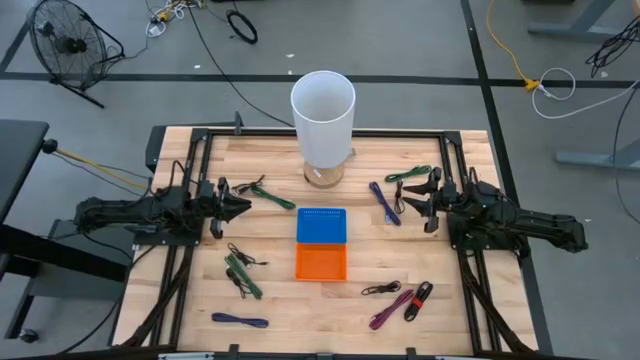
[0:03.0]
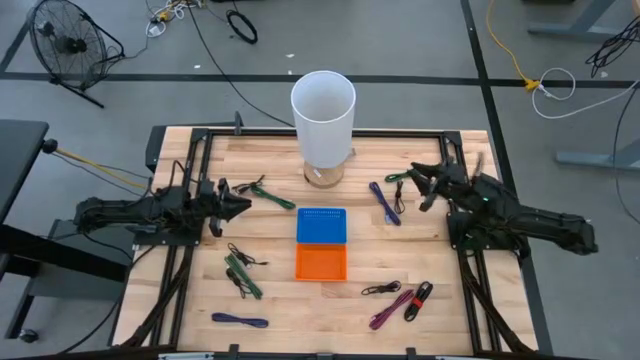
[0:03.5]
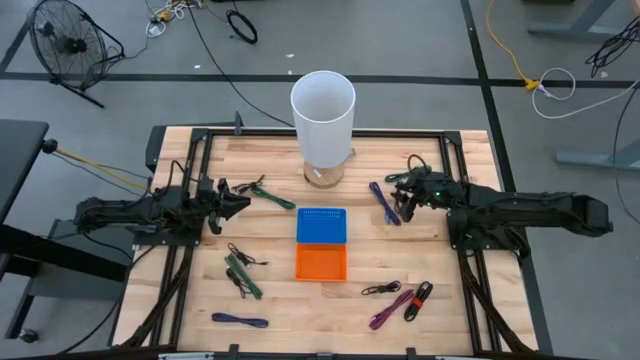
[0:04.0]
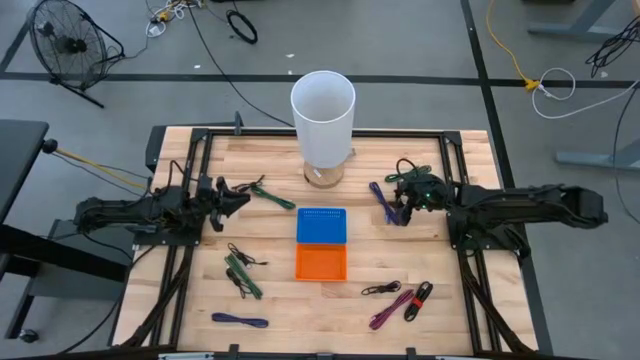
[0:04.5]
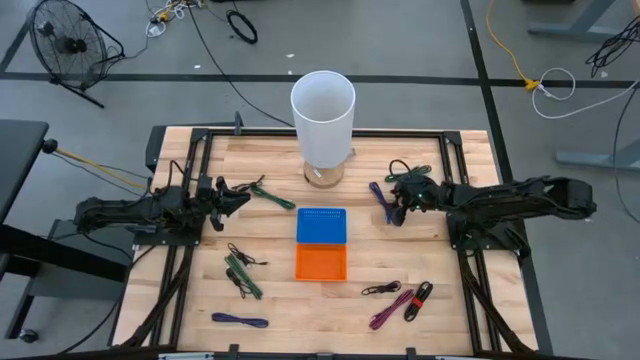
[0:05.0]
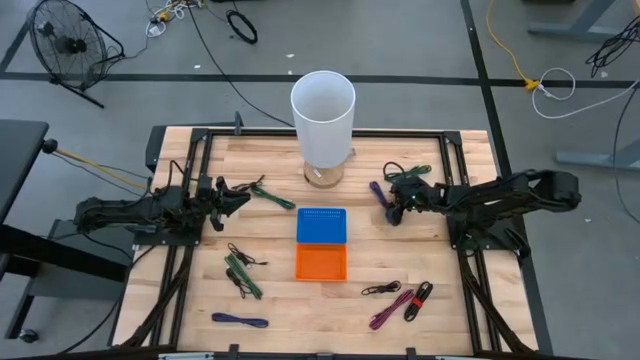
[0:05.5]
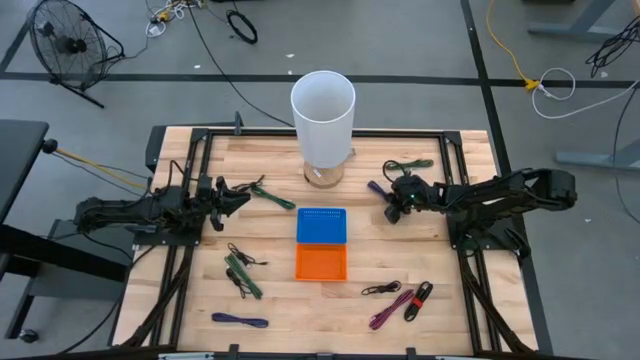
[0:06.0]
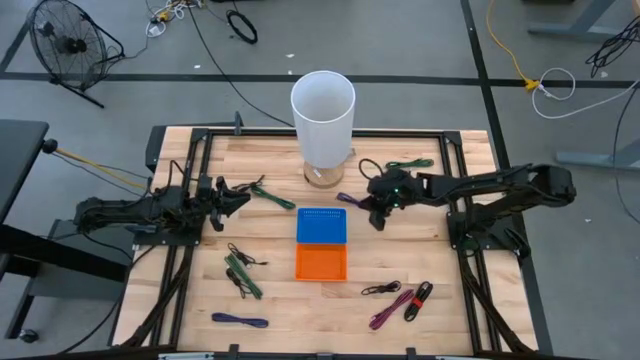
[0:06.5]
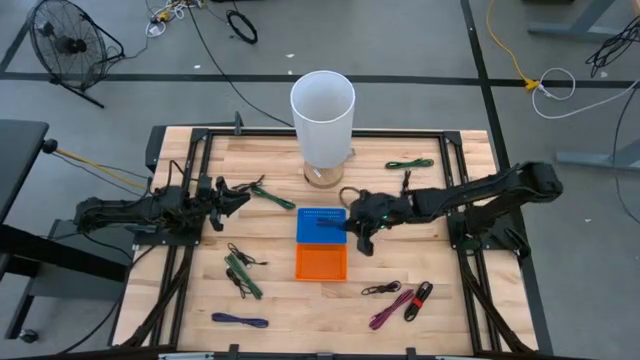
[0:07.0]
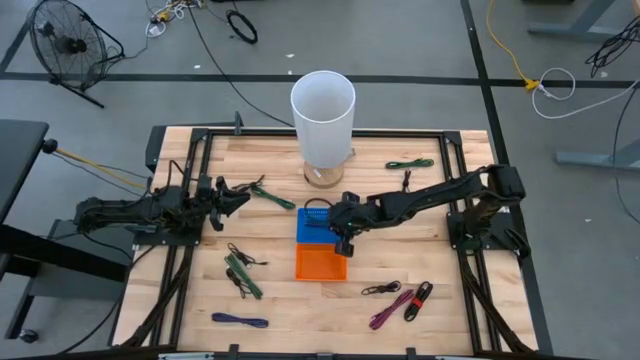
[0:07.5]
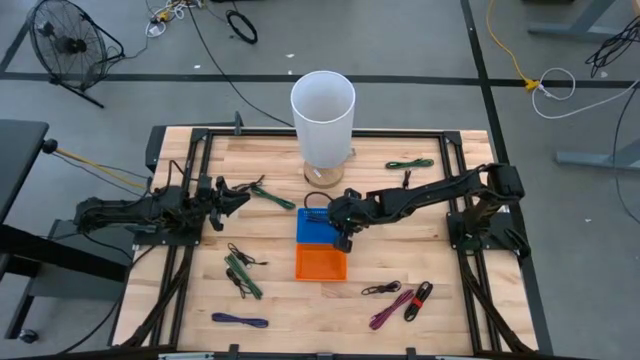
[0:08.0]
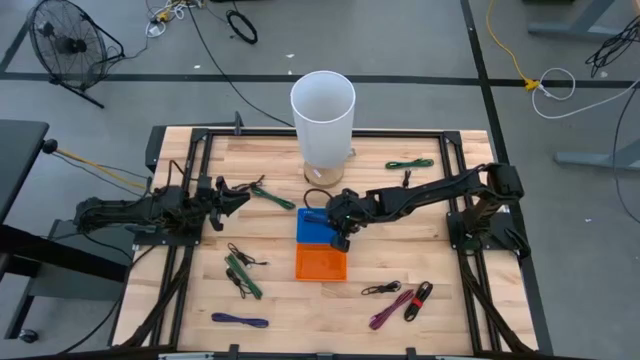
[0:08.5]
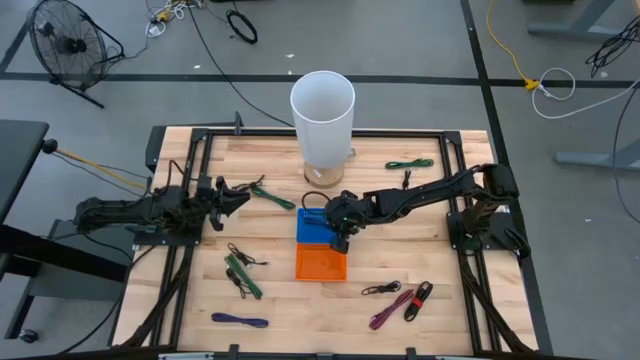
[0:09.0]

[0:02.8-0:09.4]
Task: Pick & Place USB Port
Put the blue charger cable into the blue bin

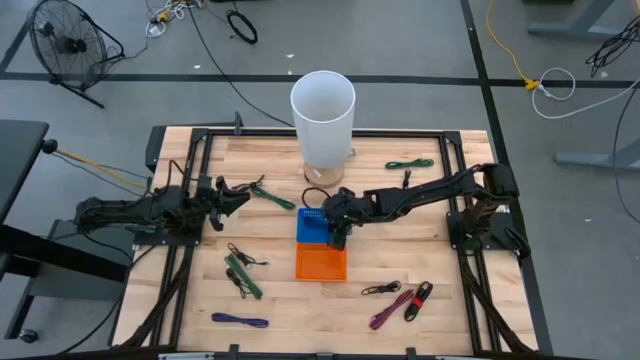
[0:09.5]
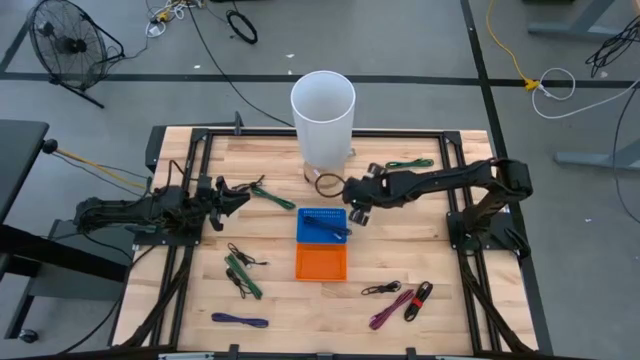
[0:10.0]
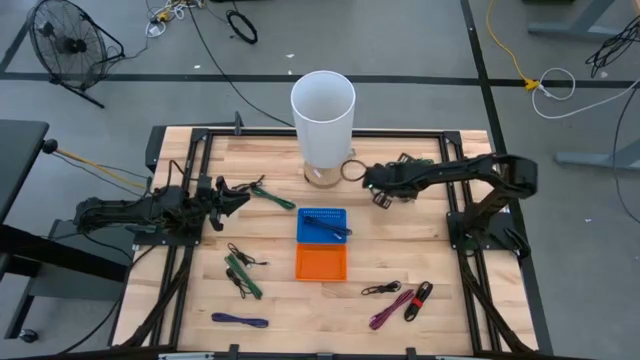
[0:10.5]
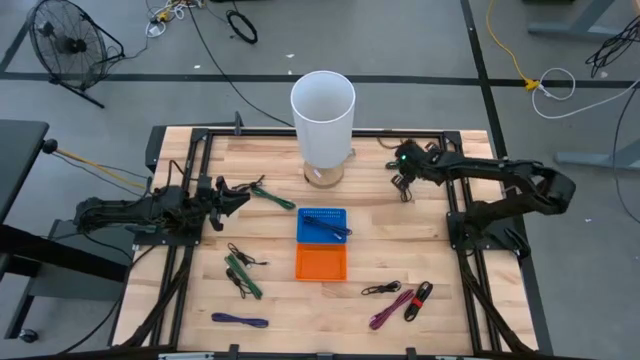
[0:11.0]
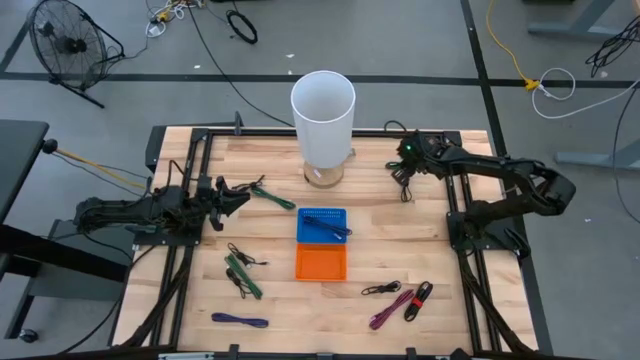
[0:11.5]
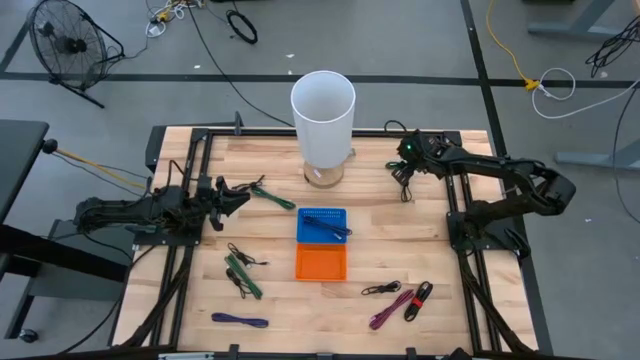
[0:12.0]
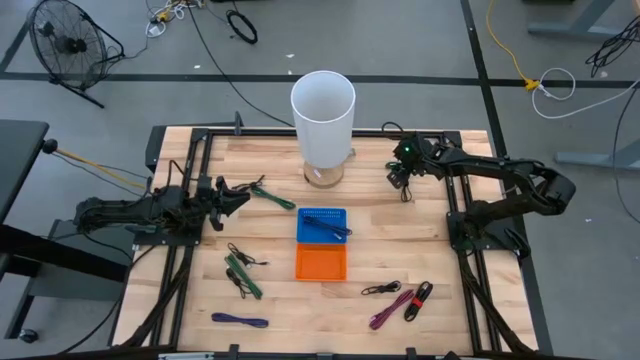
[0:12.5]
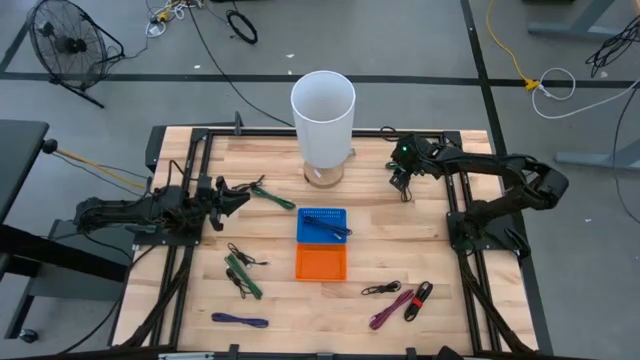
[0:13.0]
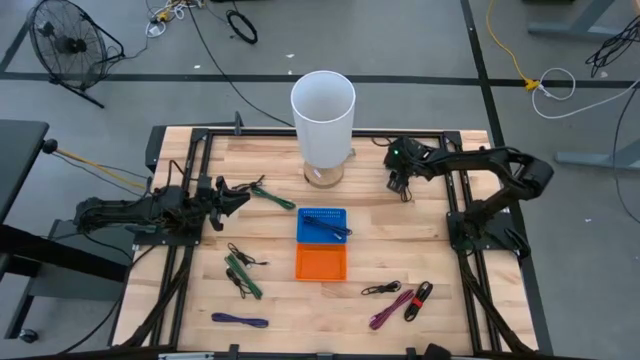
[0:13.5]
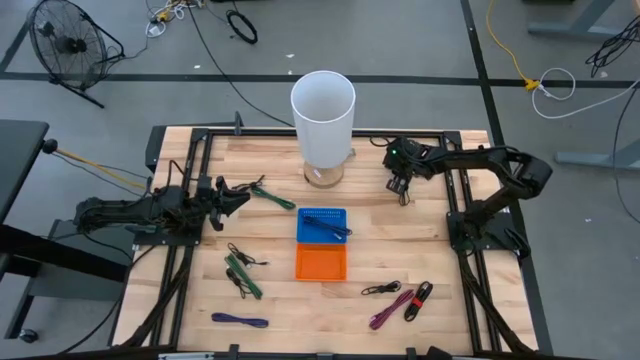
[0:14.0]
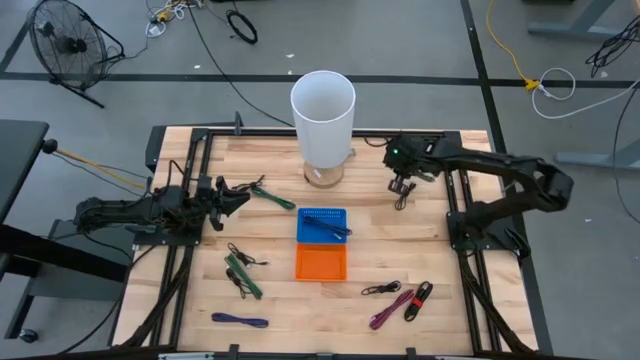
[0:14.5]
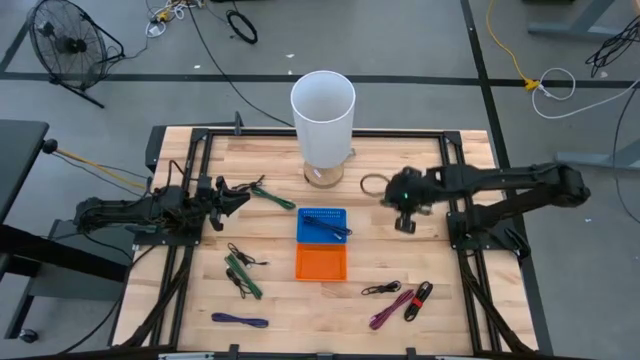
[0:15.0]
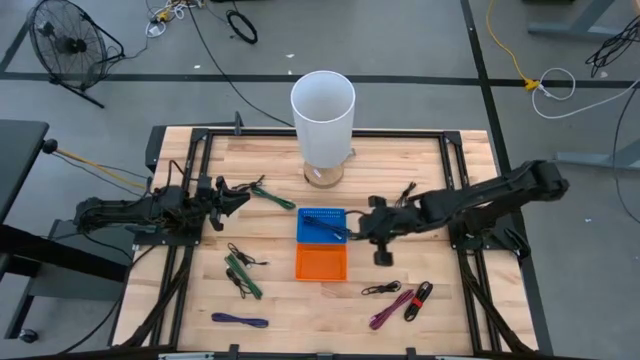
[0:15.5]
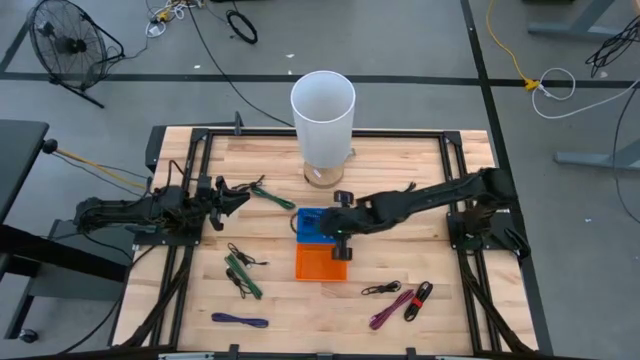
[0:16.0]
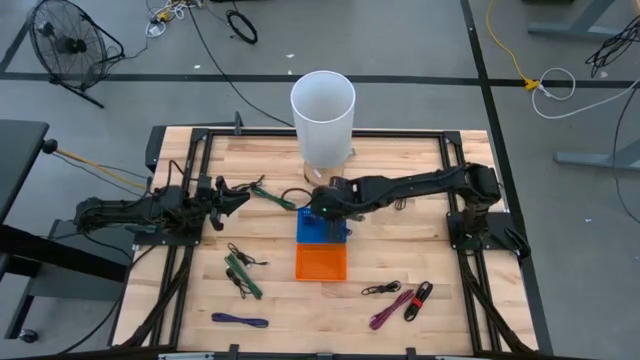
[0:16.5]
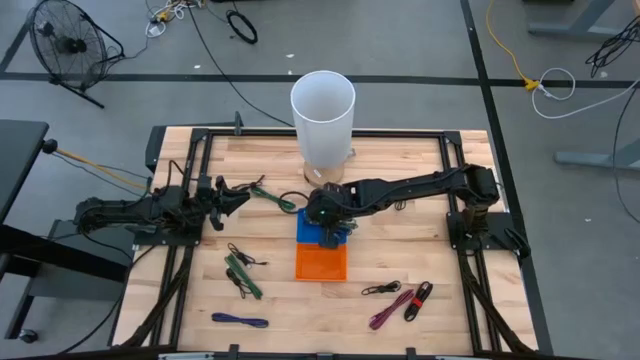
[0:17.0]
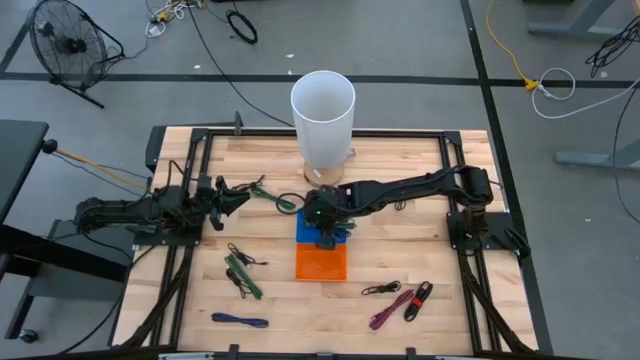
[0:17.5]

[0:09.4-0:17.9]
Put the green charger cable into the blue bin

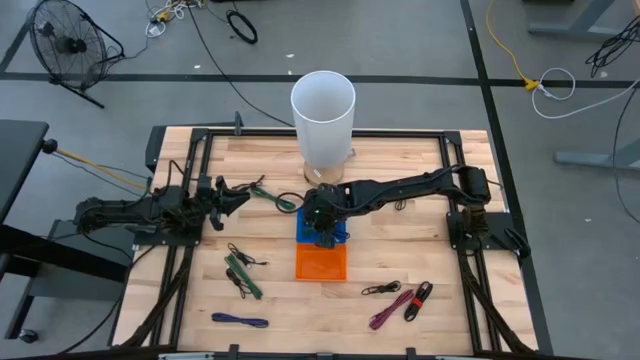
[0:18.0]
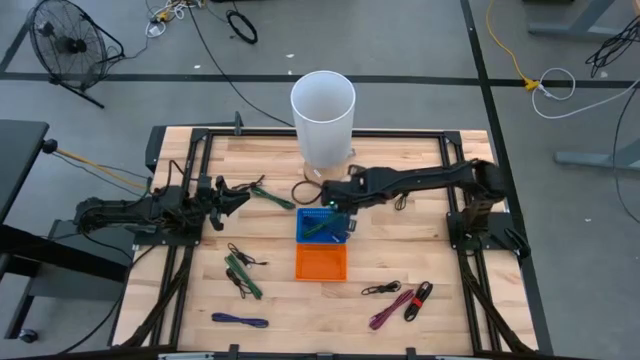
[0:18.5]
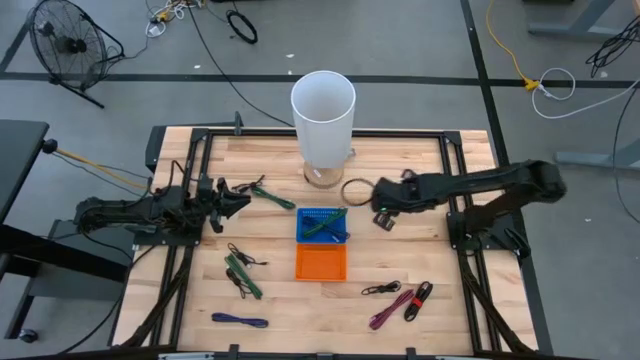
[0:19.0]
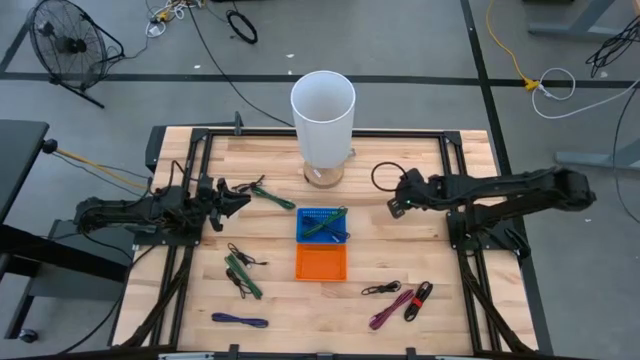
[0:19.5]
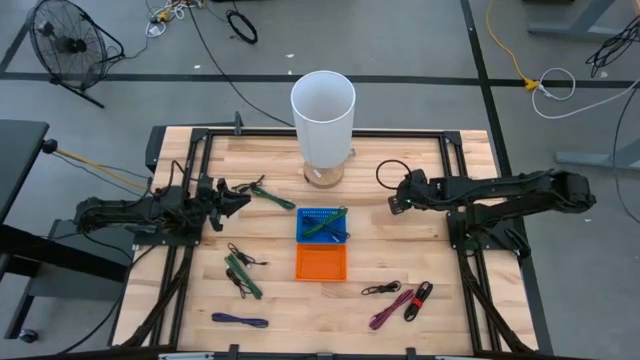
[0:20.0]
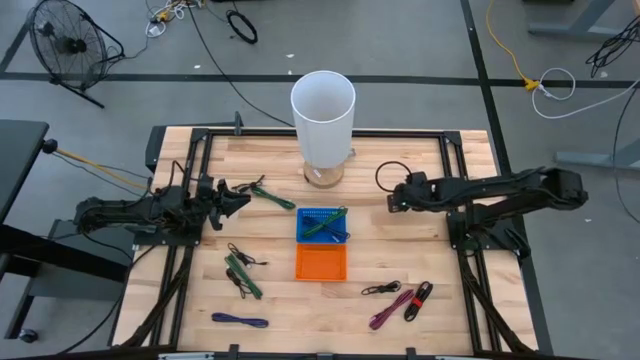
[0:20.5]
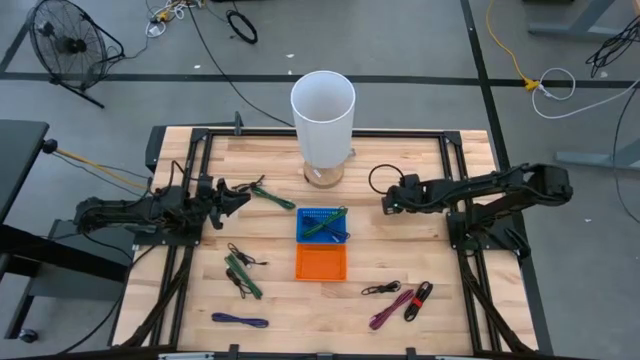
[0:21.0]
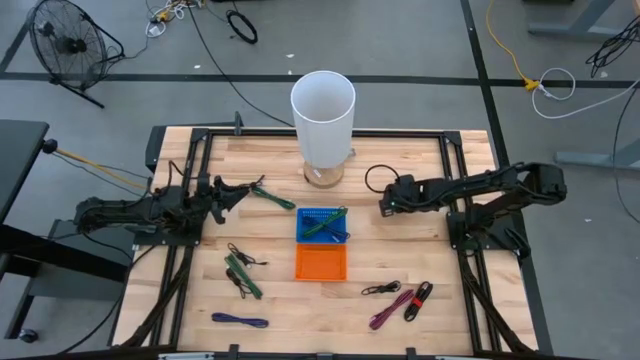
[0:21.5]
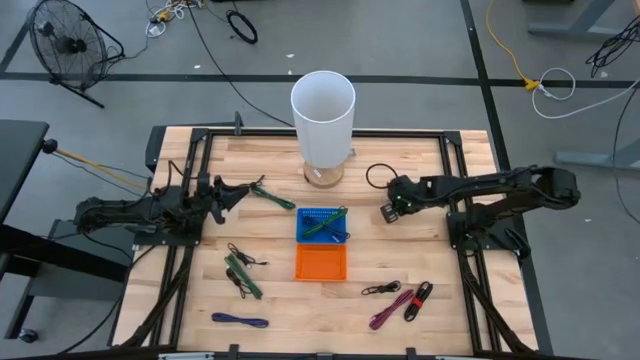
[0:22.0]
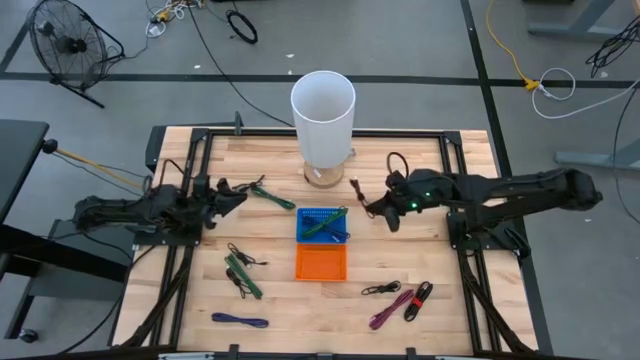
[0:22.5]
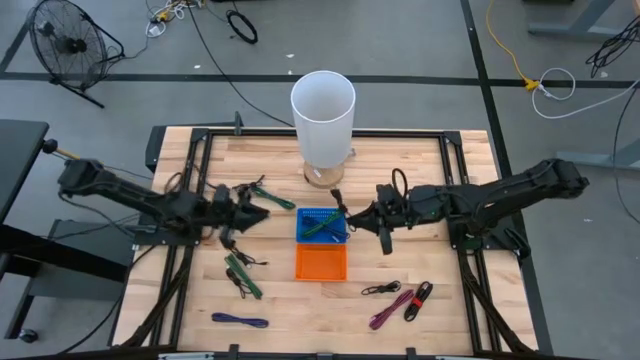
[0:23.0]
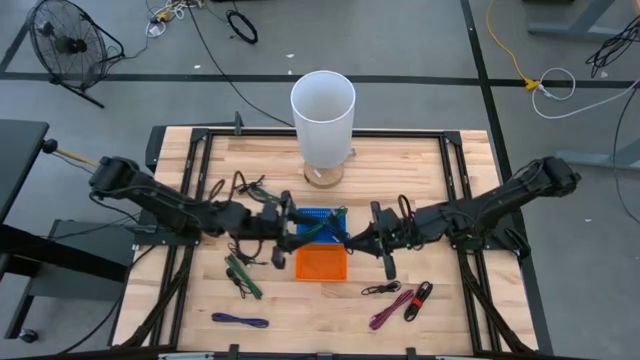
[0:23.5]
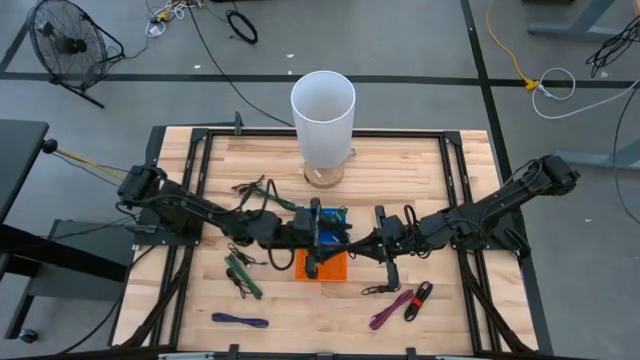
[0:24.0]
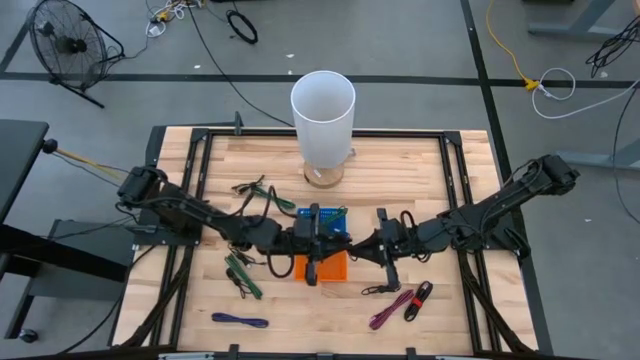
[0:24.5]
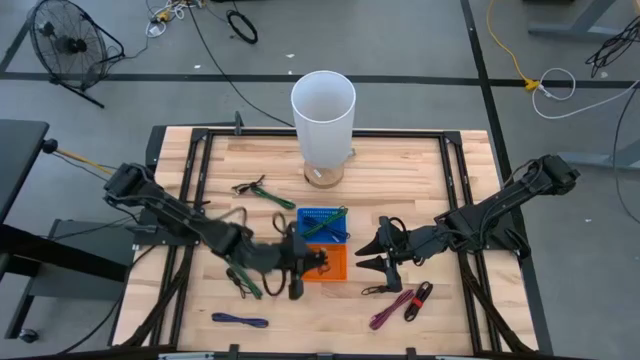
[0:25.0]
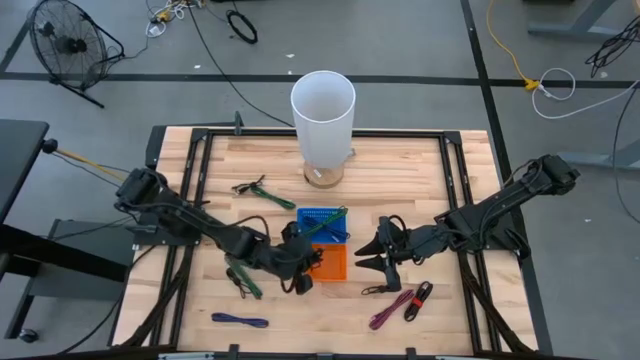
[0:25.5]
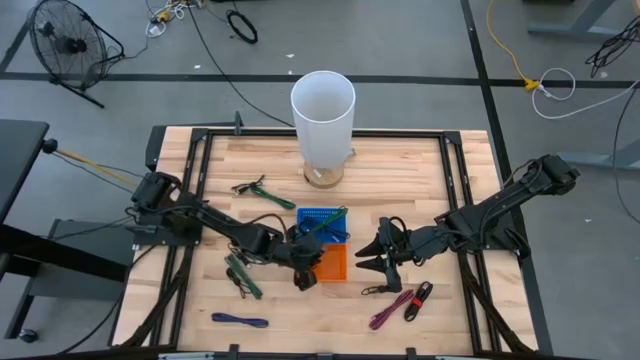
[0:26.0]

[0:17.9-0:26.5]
Put the black charger cable into the orange bin
